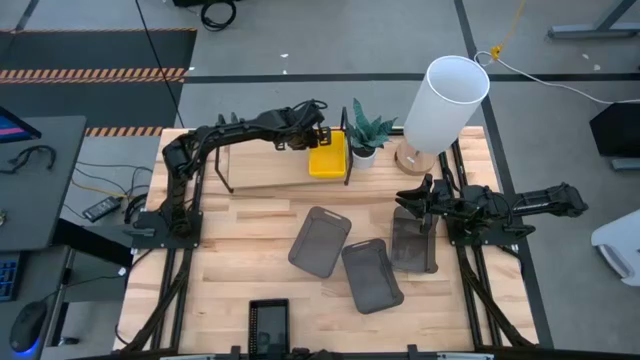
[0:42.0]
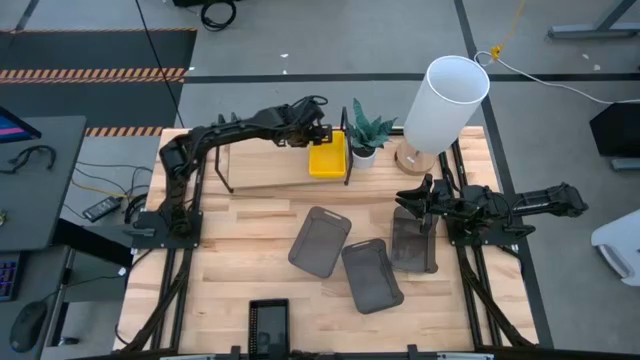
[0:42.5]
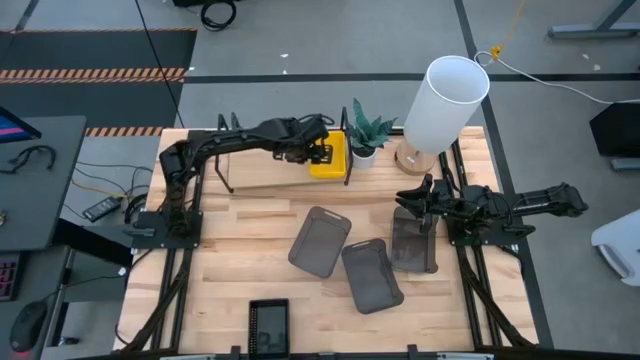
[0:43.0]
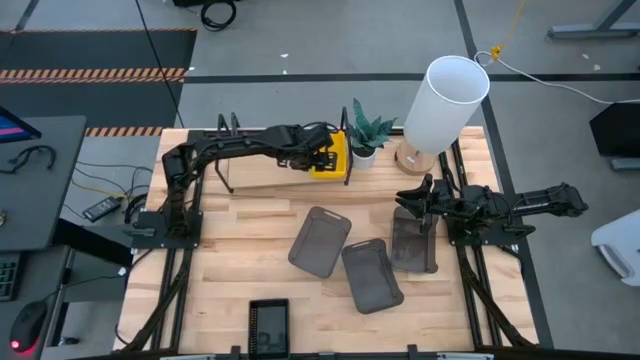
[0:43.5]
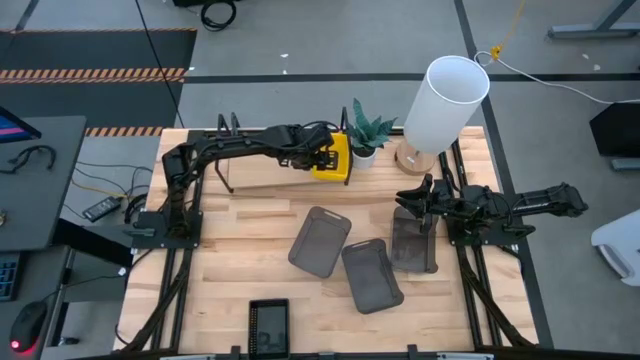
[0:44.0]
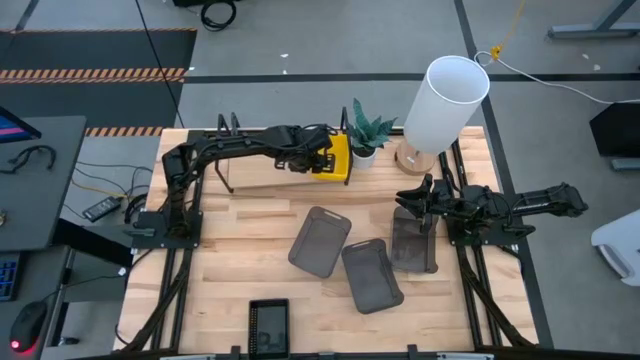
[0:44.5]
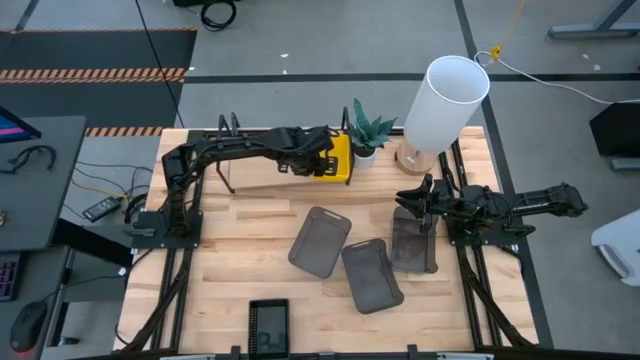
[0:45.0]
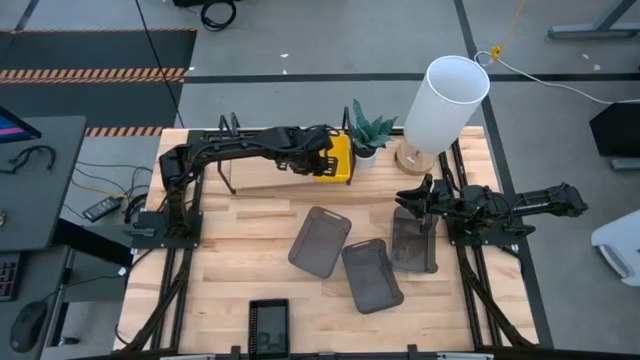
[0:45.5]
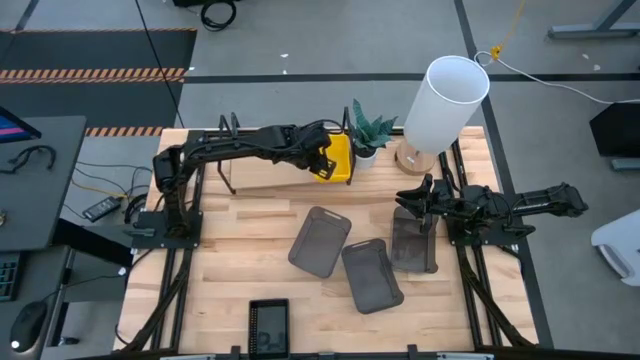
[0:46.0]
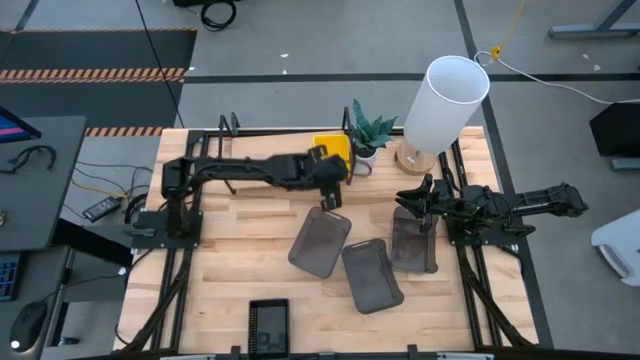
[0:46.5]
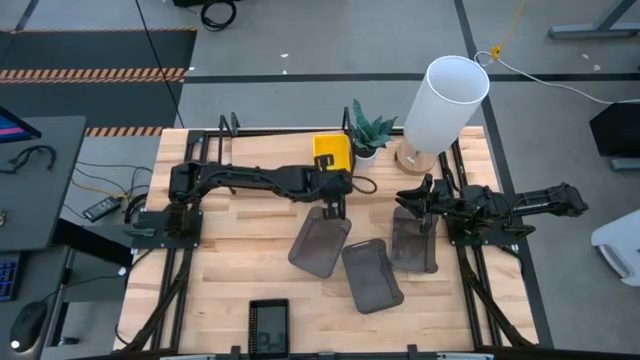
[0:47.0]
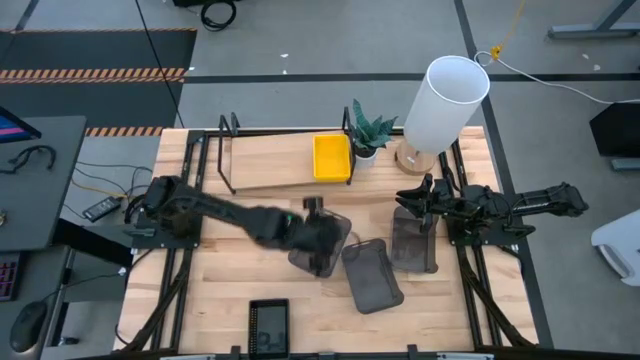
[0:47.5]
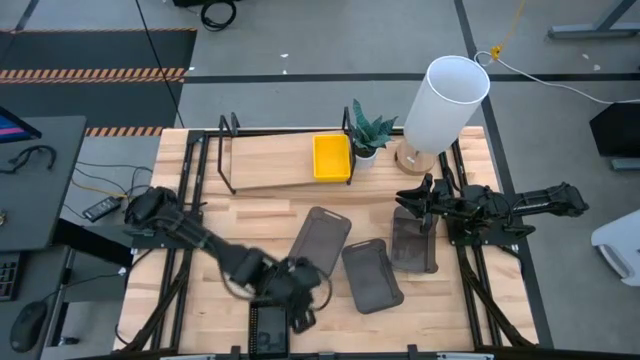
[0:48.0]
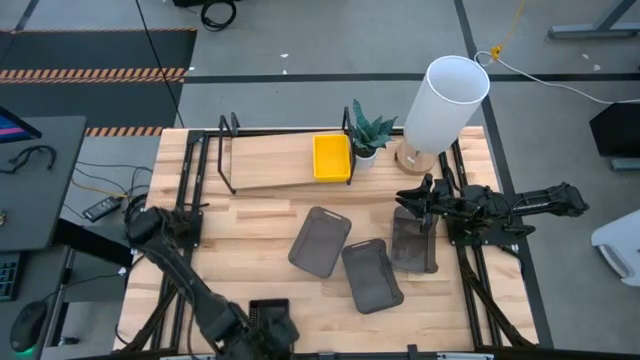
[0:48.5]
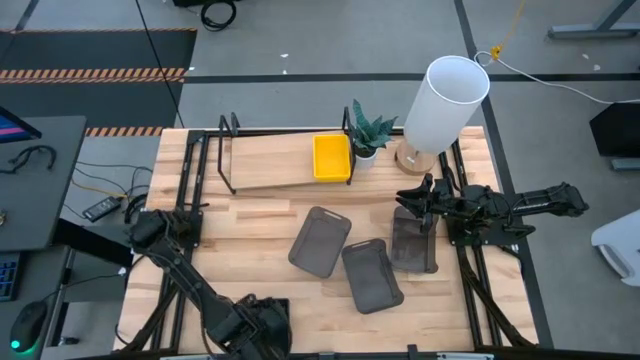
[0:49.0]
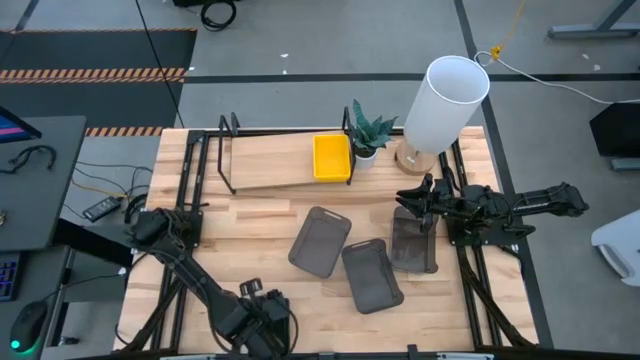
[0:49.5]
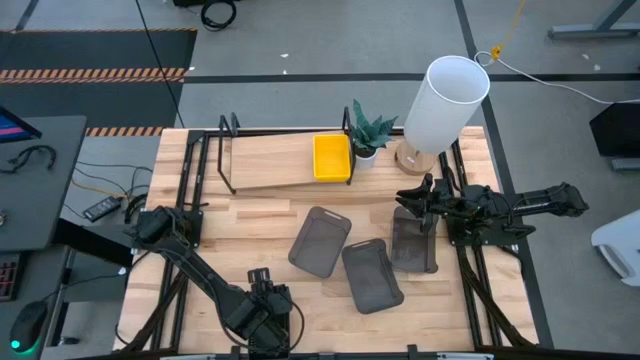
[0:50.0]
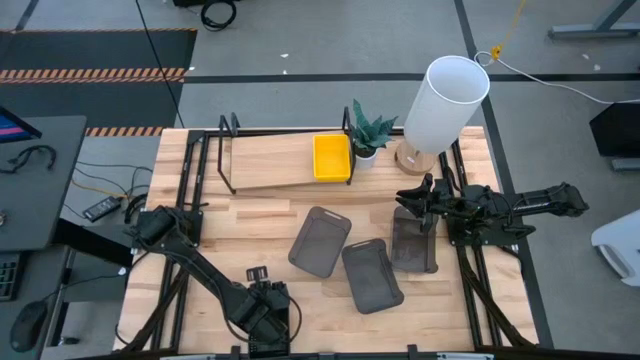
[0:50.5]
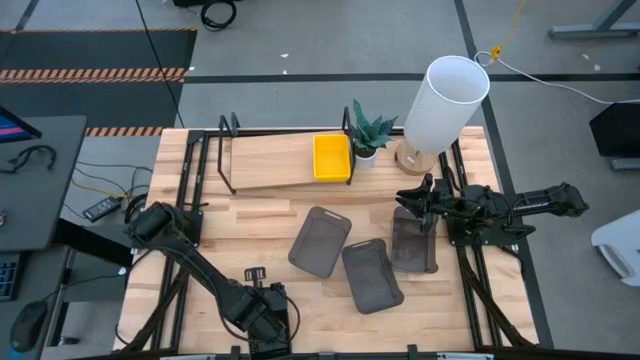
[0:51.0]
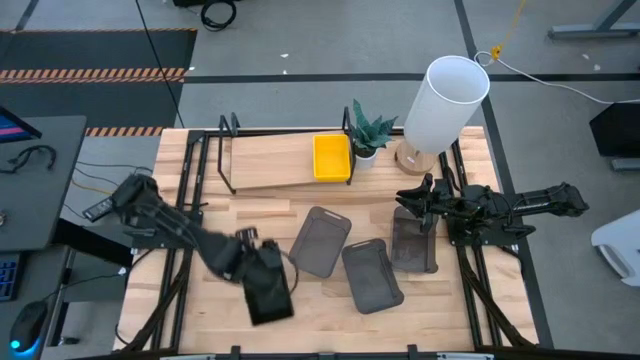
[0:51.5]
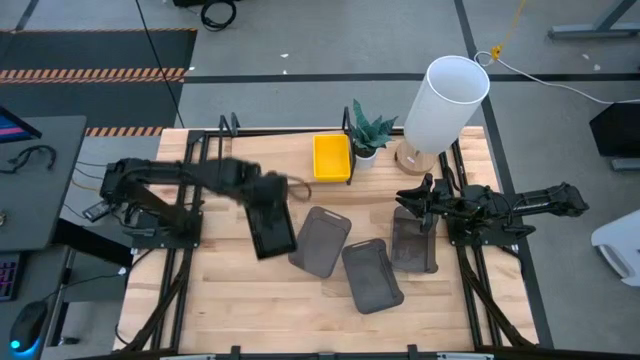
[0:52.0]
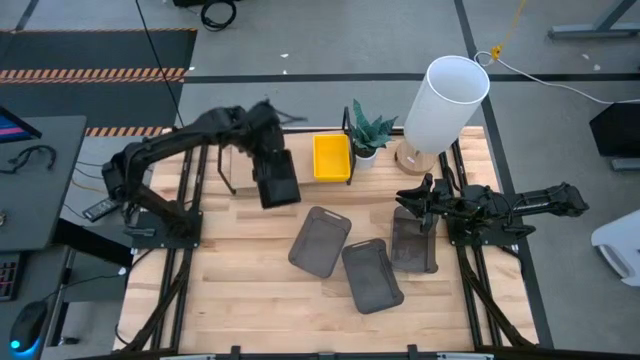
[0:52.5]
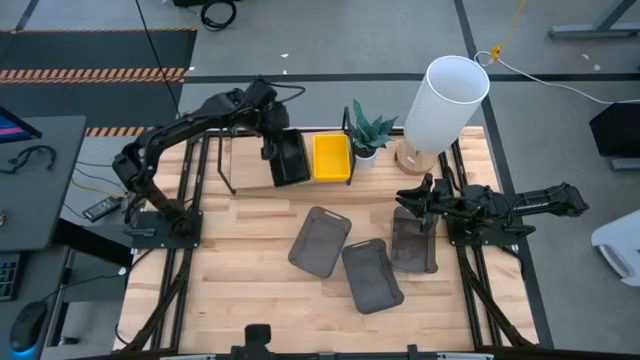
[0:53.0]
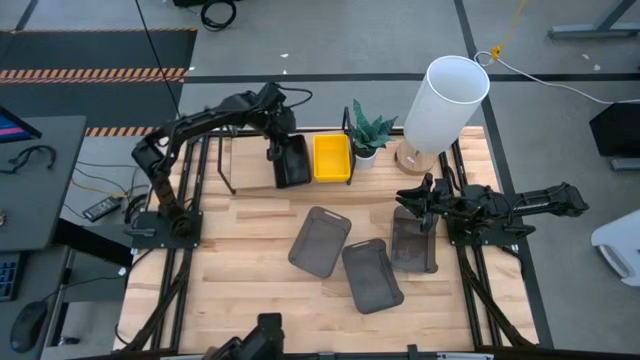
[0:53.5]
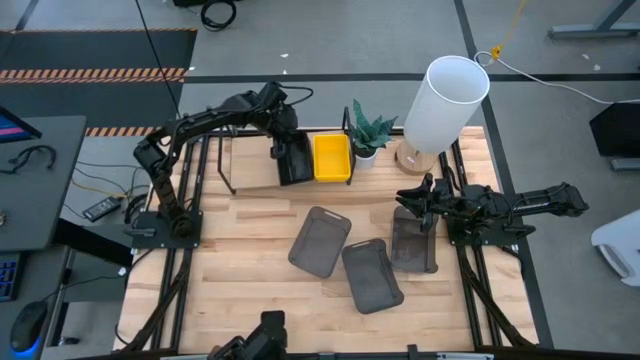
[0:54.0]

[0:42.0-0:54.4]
Task: Stack baskets on shelf by color
Put the stacked black basket on the shelf

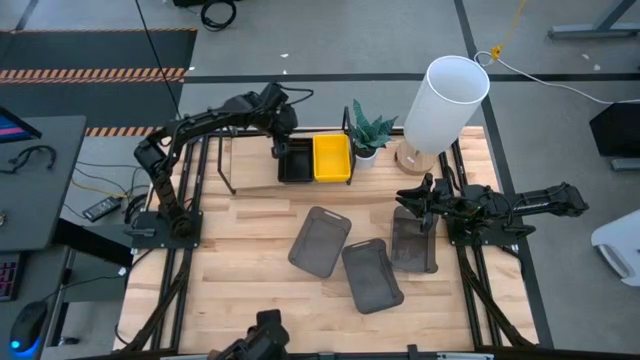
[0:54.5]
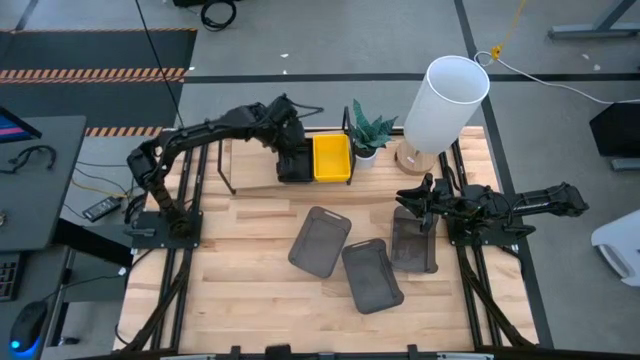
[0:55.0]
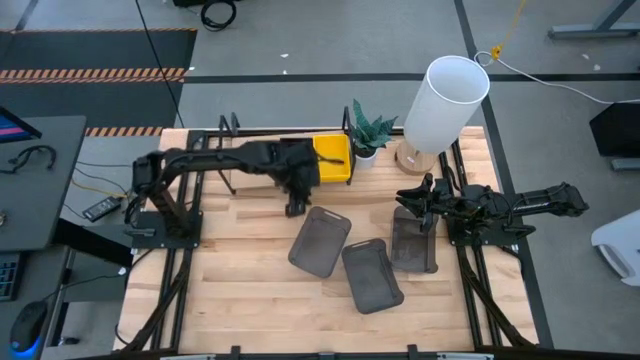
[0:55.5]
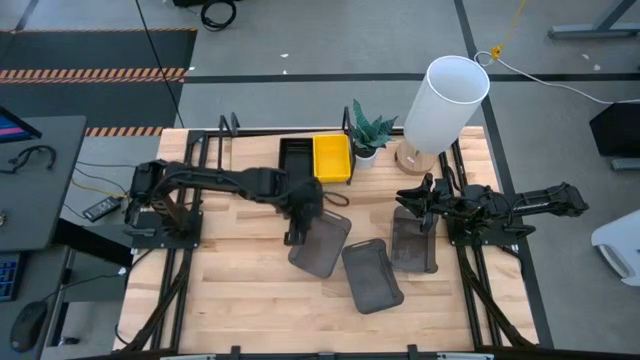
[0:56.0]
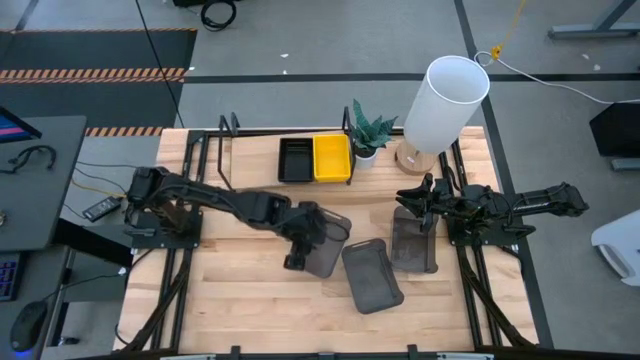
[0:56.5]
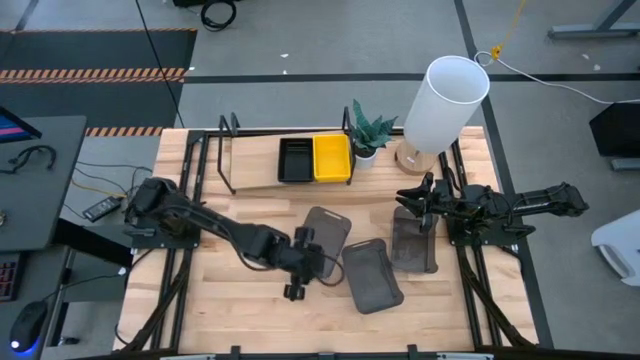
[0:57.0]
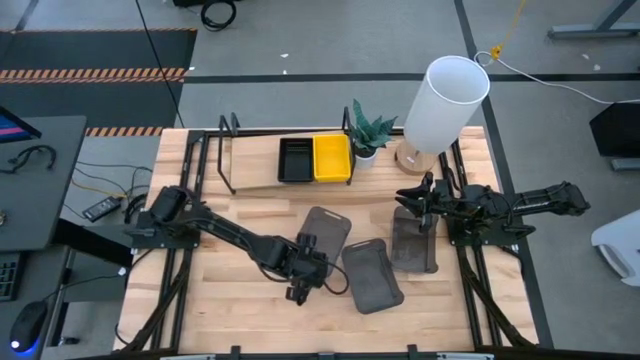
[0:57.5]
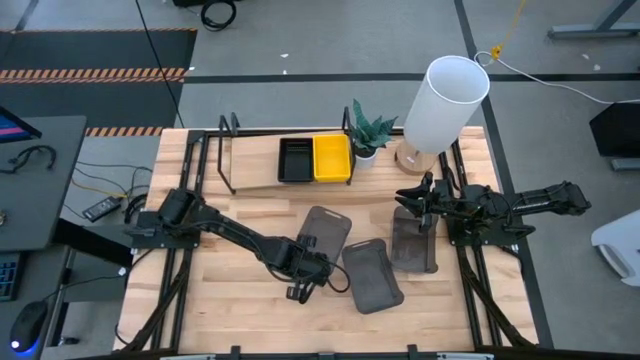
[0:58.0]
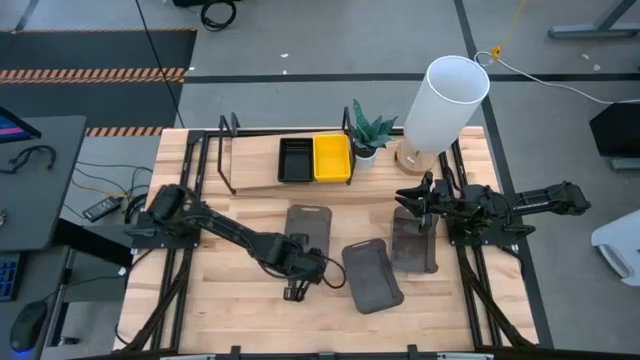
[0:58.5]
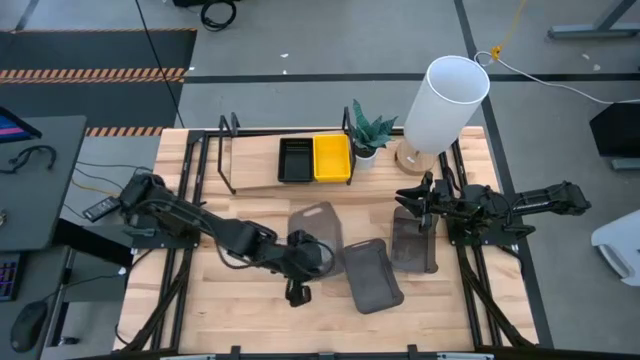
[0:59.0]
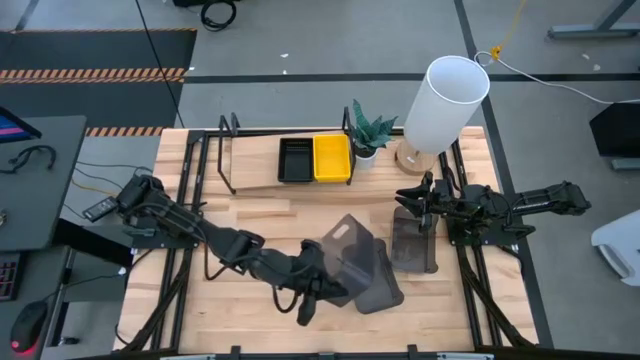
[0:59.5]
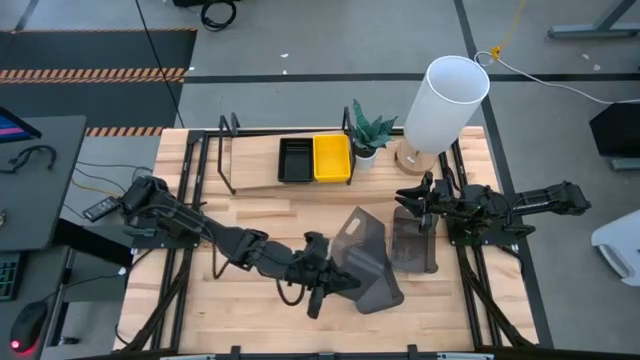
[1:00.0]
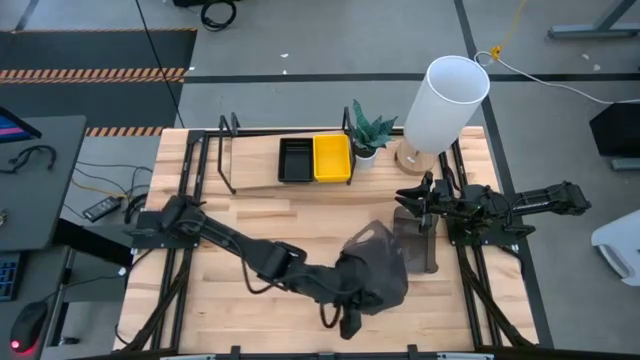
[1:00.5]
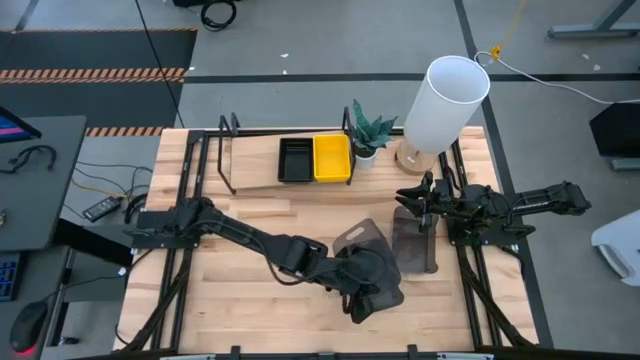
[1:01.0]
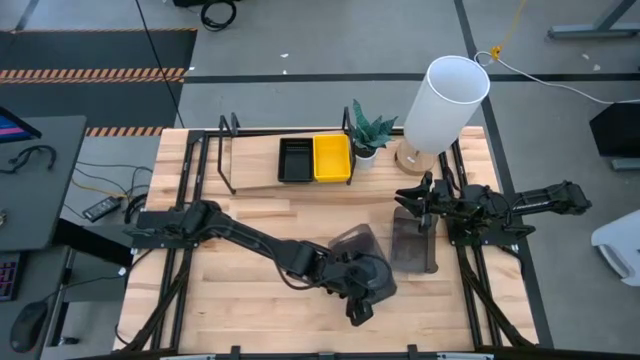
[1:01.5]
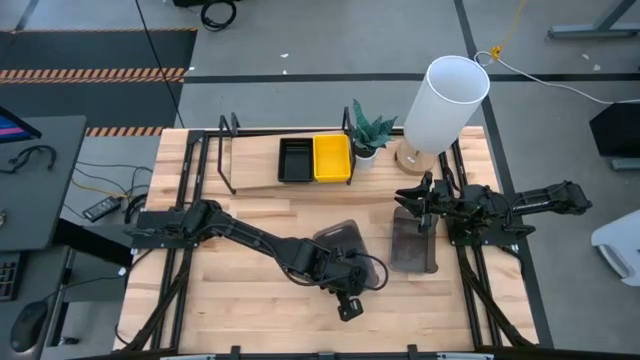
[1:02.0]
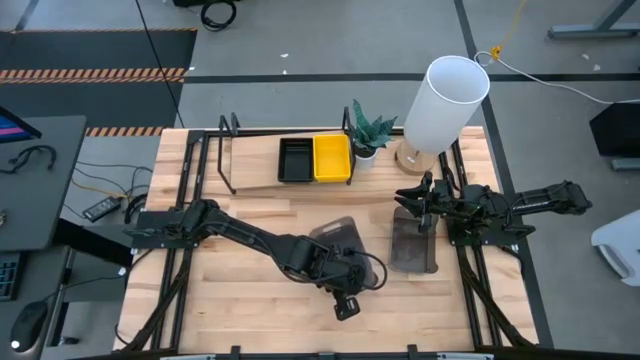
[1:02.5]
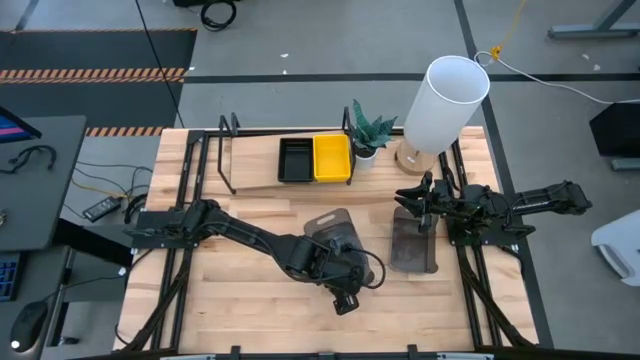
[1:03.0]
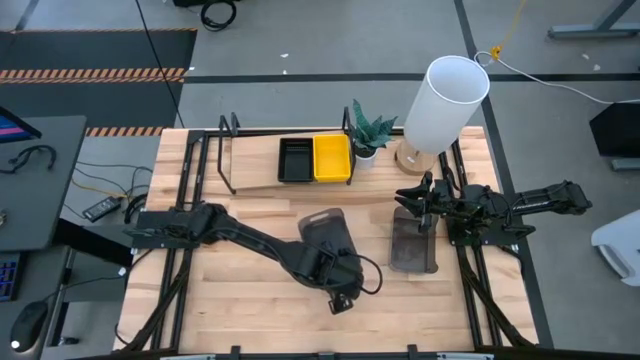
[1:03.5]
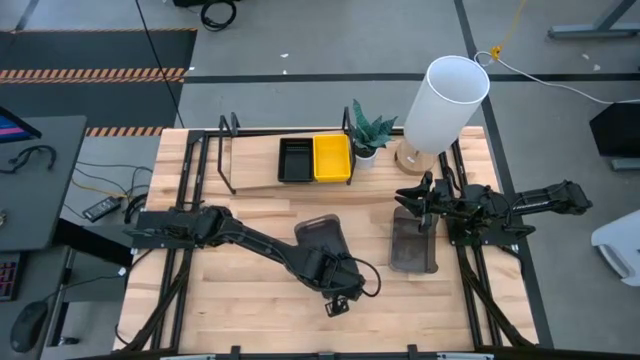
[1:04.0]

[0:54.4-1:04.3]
Stack the left black bin onto the middle black bin
